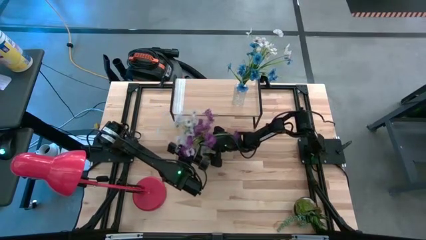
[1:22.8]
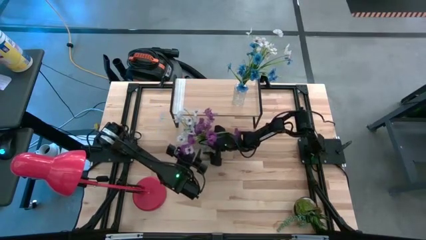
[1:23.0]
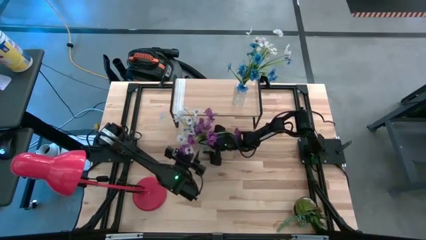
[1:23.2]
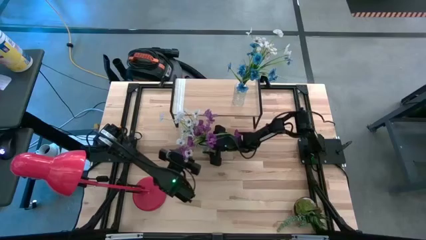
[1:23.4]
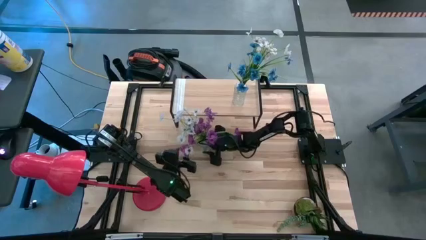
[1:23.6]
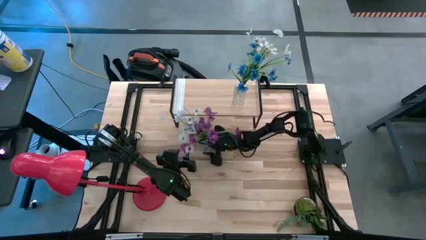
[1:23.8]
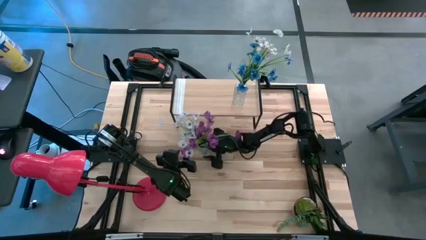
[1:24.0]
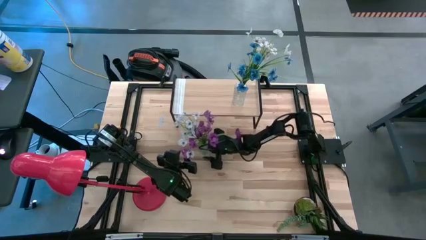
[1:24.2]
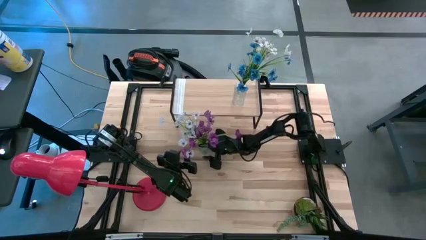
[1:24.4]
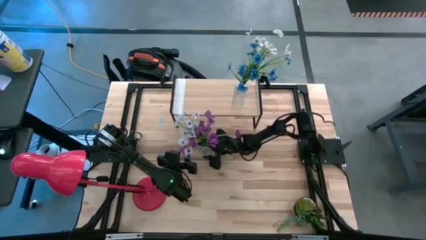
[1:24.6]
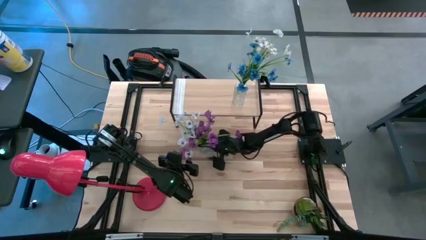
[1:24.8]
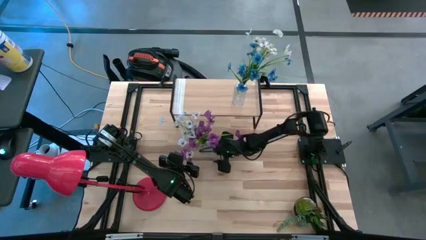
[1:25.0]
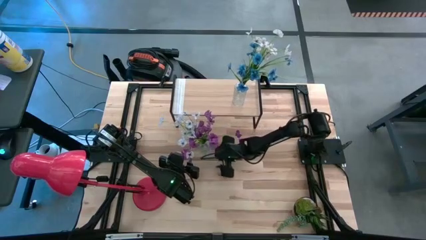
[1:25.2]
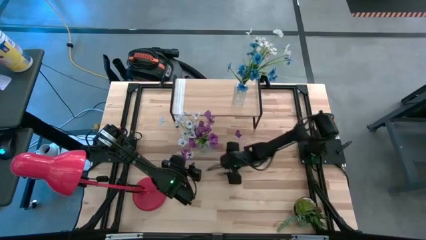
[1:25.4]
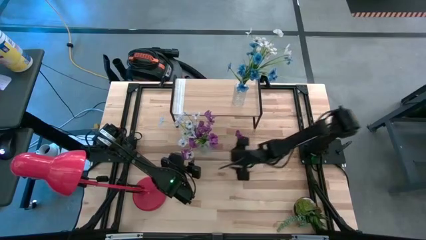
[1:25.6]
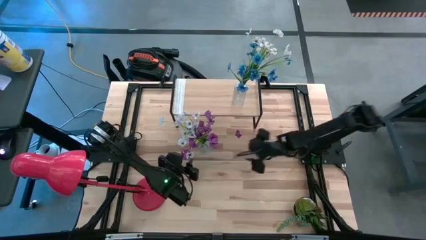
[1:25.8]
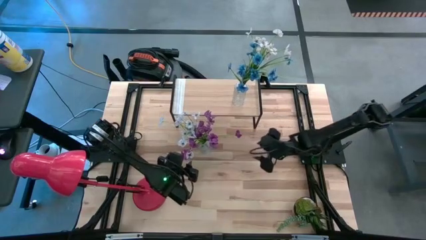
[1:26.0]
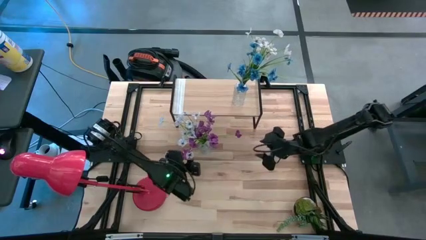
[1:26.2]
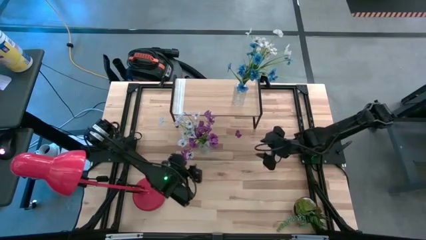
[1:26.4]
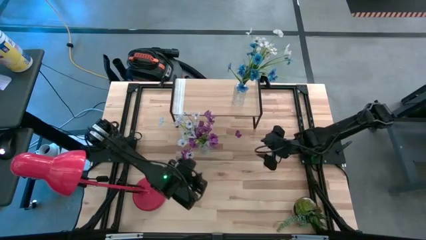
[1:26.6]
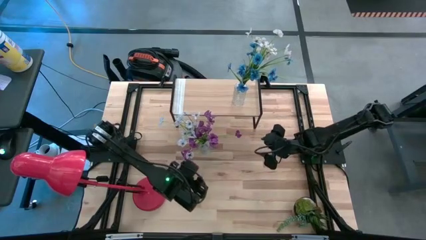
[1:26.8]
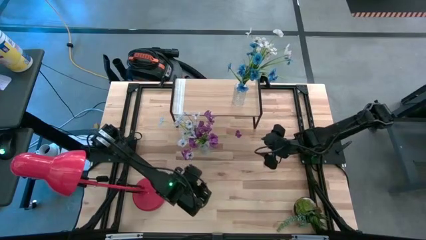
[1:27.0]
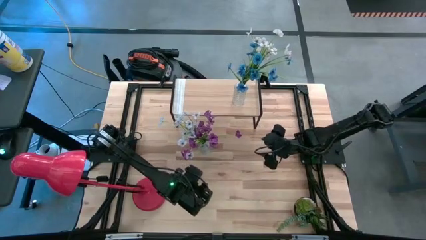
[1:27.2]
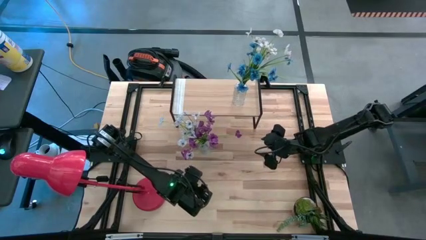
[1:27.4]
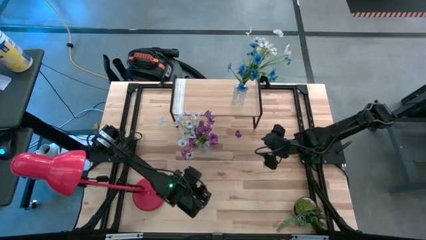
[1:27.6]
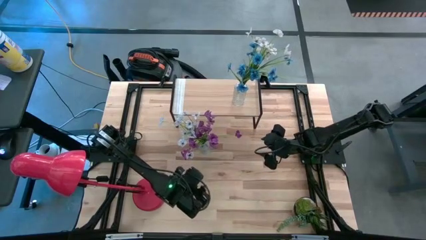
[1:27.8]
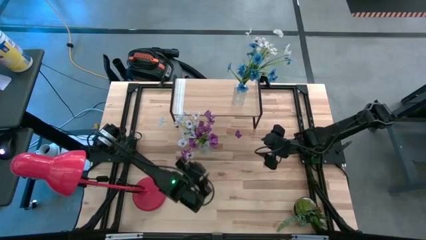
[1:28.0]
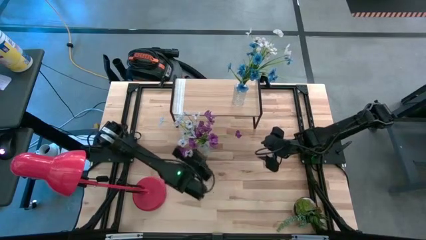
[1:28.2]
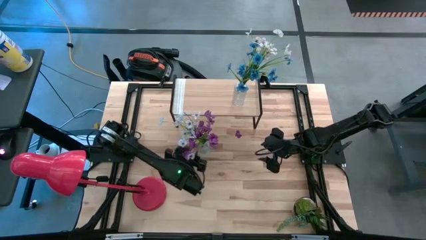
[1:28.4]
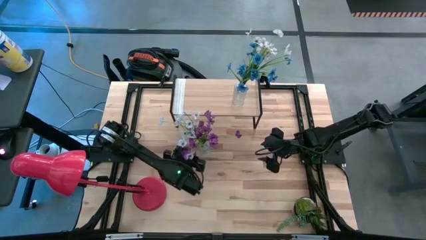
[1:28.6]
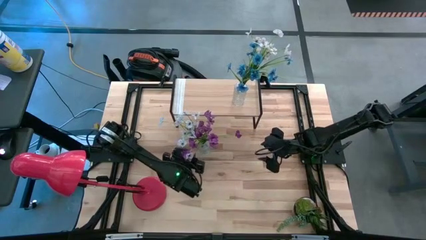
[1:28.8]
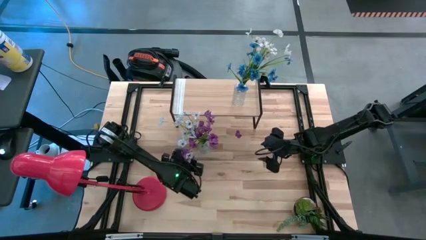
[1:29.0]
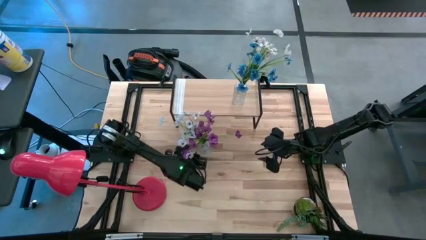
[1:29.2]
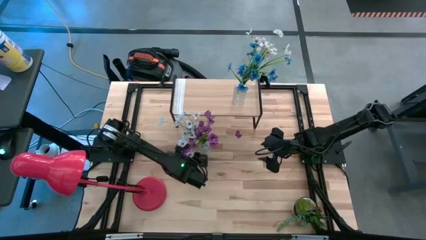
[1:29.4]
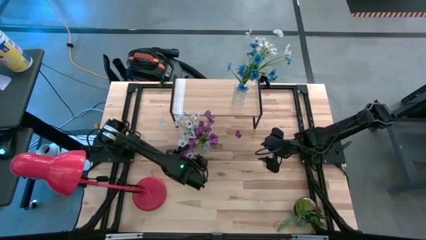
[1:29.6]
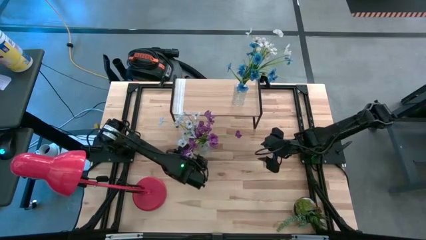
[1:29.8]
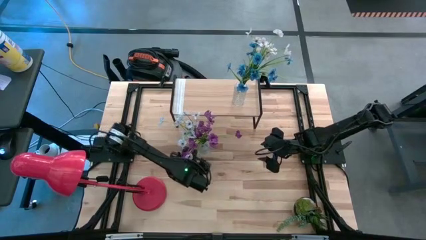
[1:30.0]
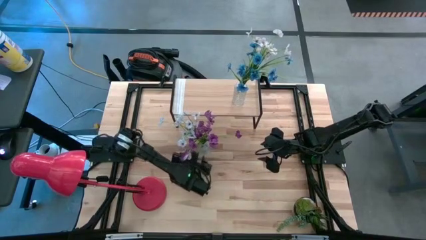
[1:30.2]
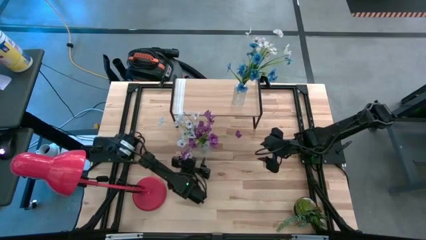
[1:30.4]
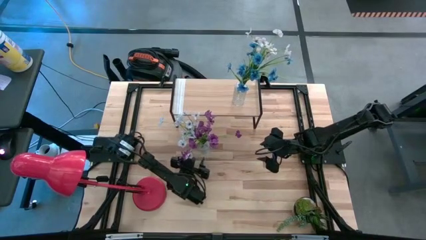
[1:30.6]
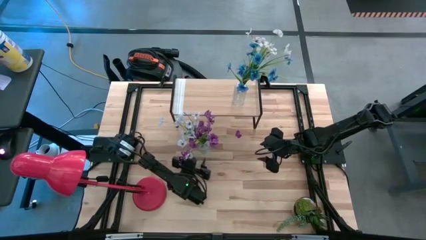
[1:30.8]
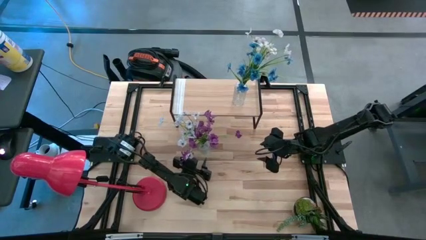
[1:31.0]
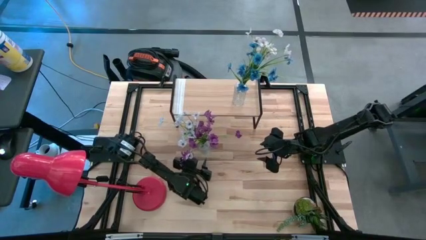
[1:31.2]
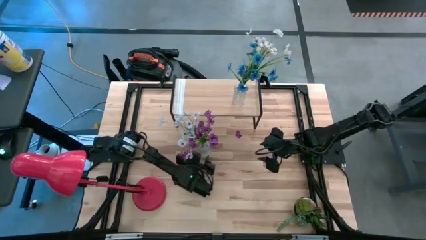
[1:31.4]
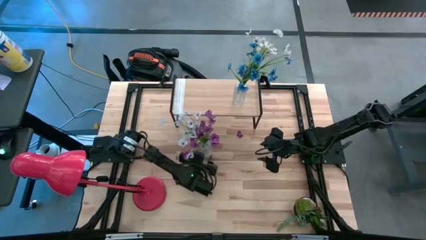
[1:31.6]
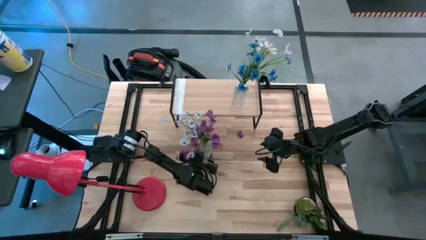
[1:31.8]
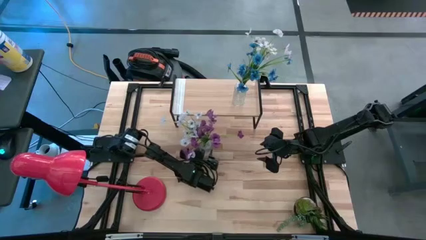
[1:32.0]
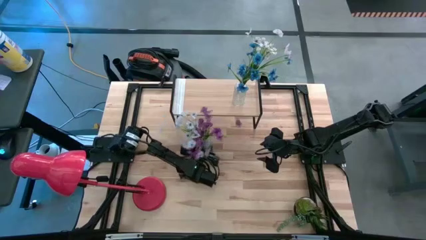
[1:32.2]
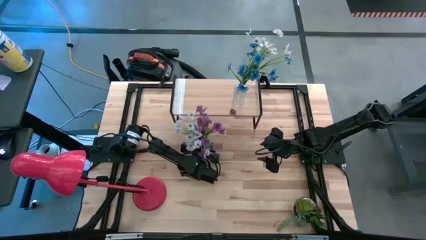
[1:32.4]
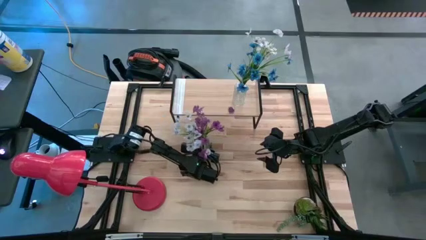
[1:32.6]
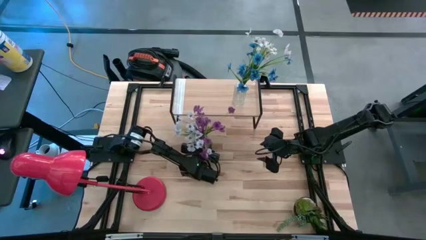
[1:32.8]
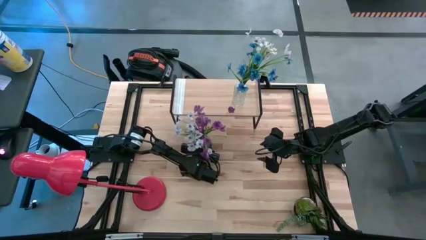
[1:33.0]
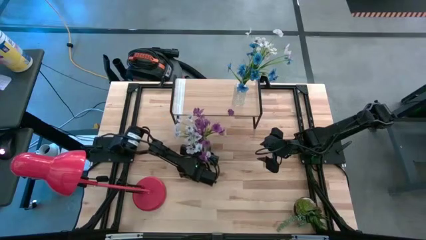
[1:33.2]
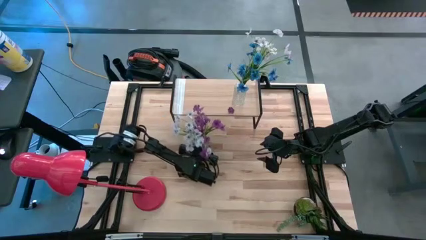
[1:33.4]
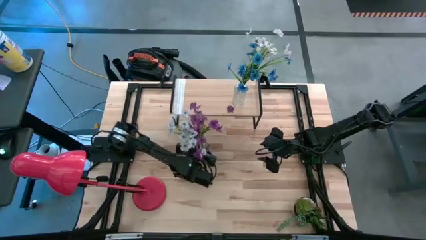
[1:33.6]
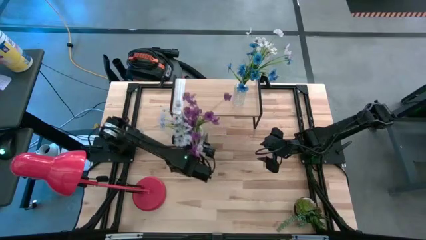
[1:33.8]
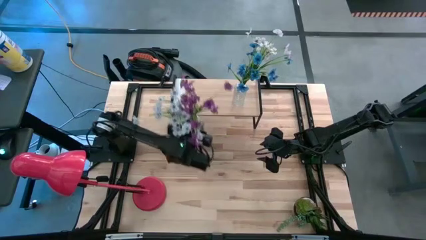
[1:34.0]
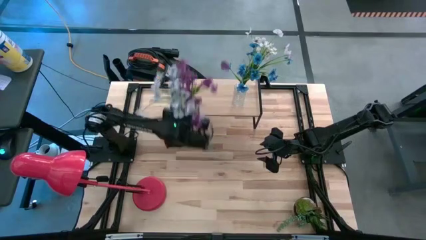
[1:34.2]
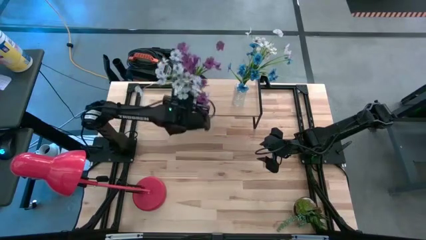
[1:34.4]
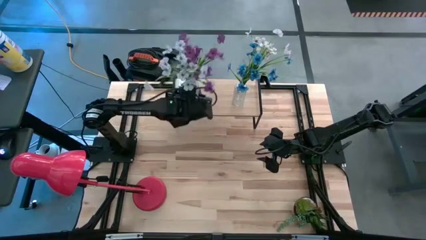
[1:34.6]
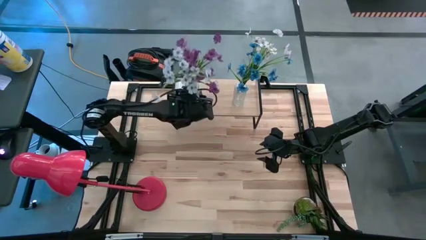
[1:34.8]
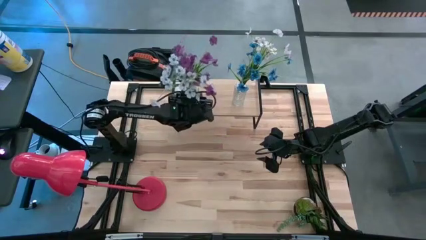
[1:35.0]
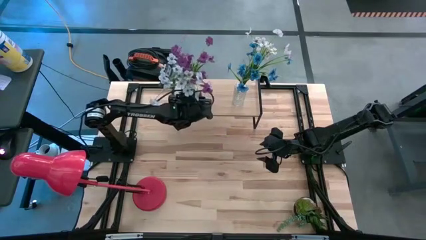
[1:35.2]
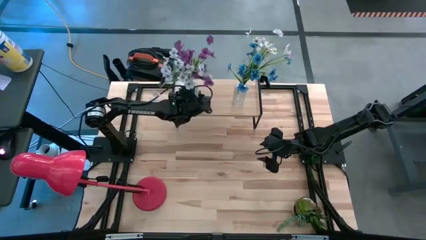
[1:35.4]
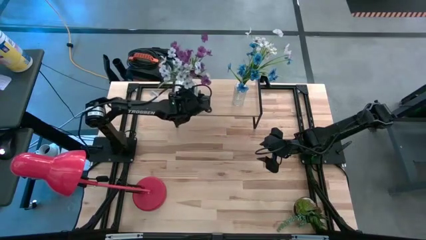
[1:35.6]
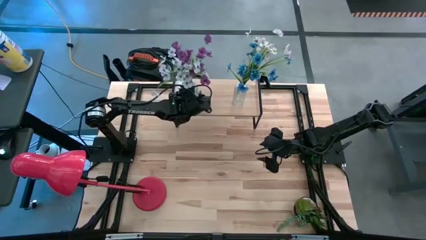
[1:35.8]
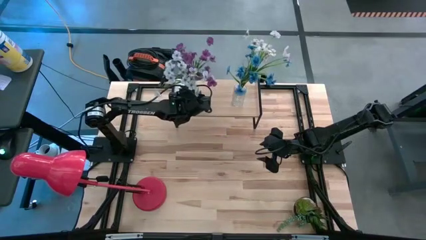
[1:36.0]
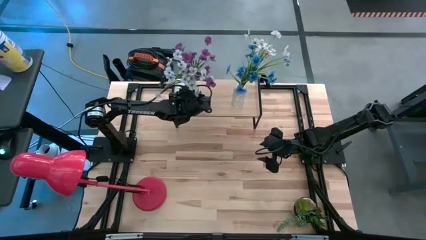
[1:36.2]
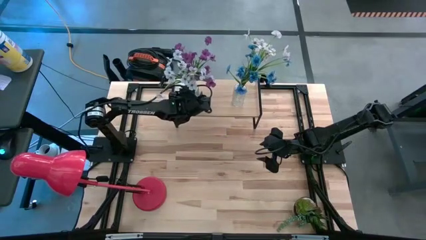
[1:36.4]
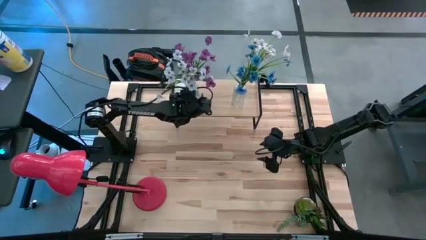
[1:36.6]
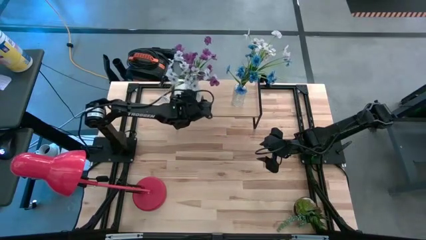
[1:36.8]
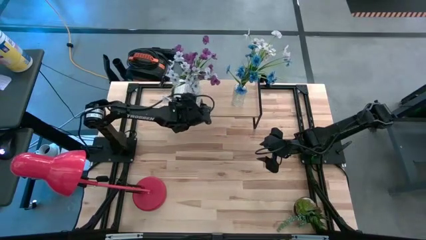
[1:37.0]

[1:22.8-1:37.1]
Task: Pick and place flowers into a vace then onto a shelf
Put the flower vase on the shelf
